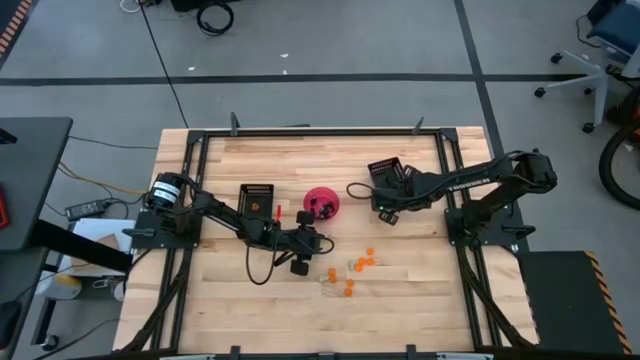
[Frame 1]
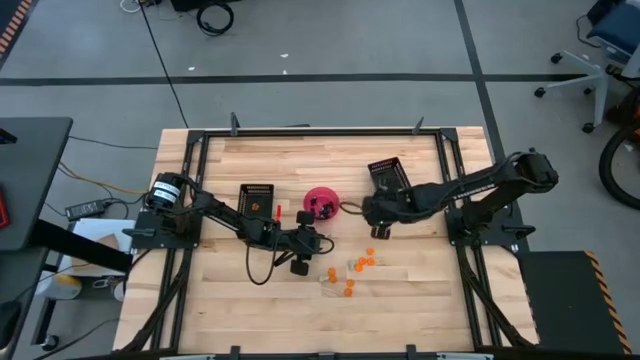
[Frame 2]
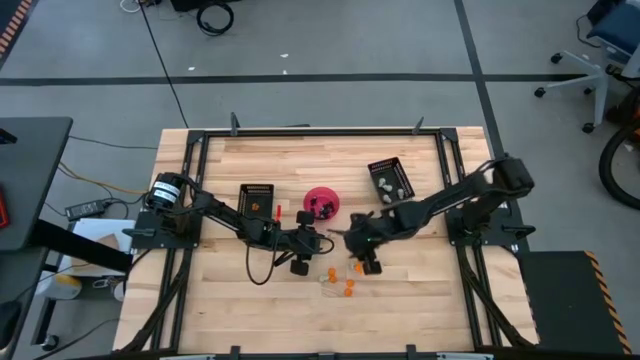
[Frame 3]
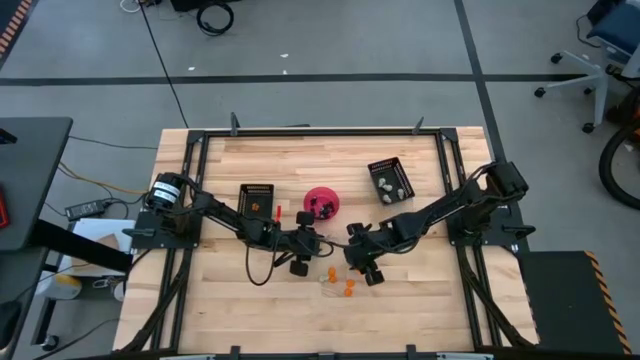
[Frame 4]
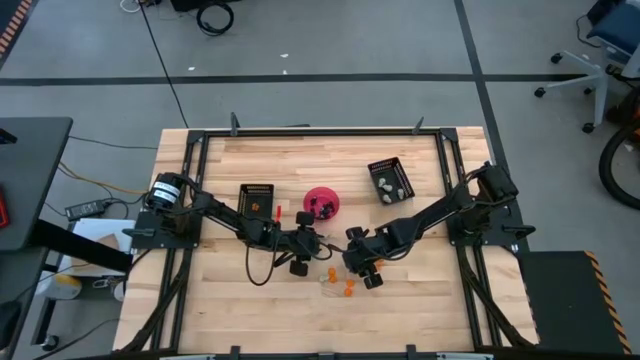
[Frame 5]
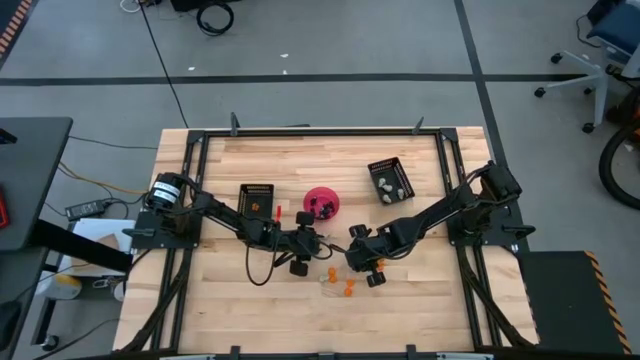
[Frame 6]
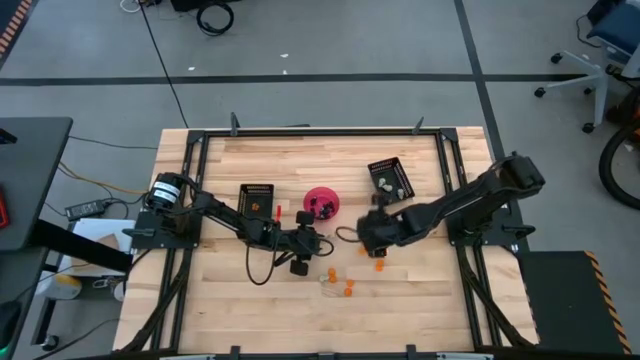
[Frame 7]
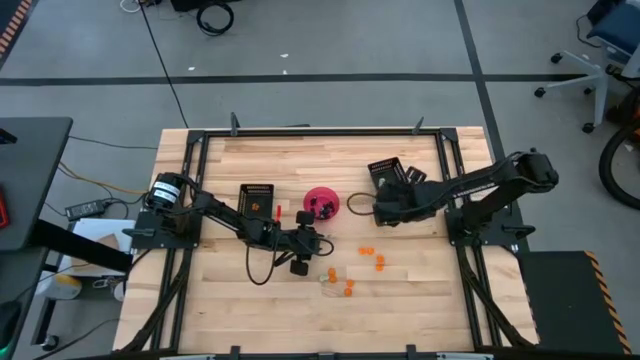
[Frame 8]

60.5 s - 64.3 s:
Task: Sort Halloween decoration
Put the white skull toy into the right black bin

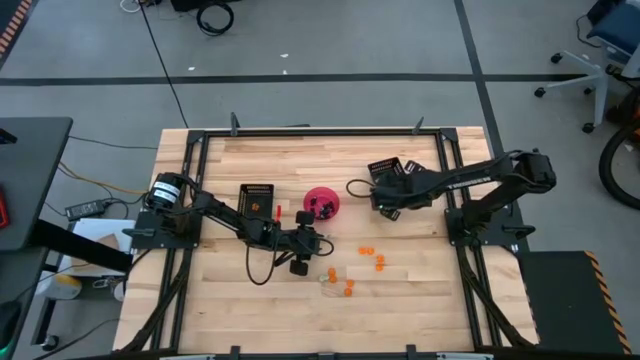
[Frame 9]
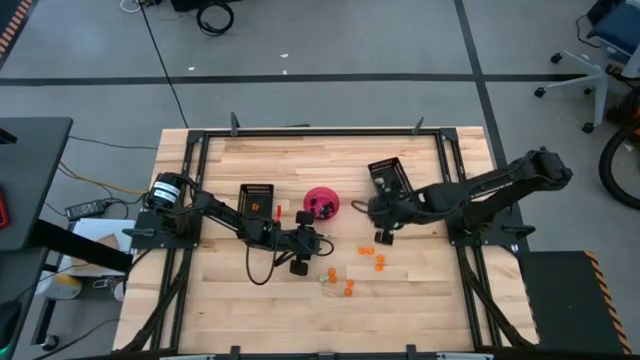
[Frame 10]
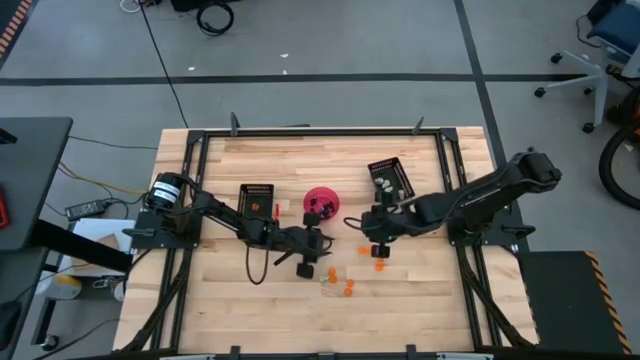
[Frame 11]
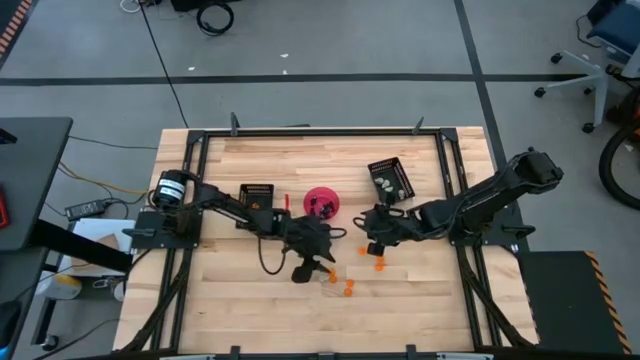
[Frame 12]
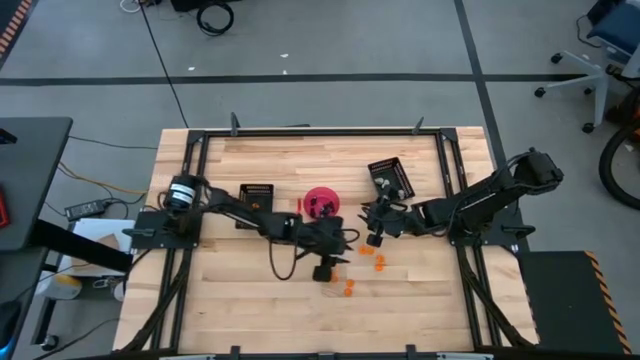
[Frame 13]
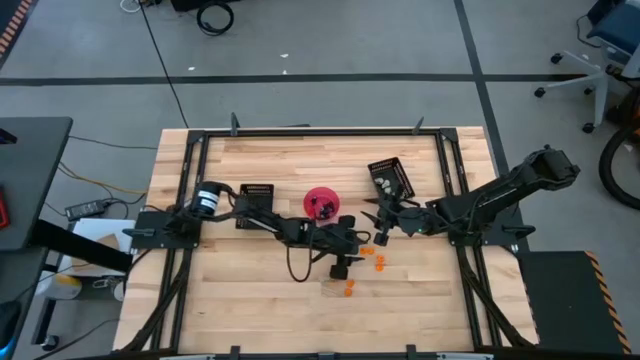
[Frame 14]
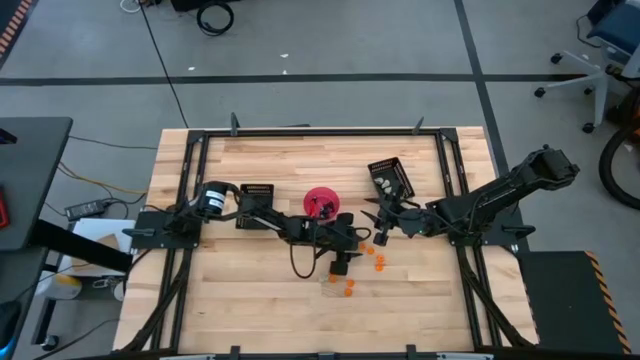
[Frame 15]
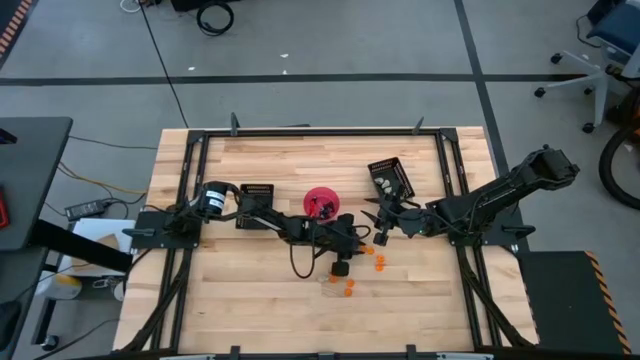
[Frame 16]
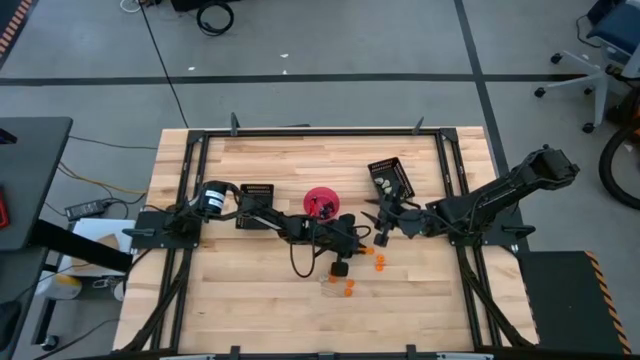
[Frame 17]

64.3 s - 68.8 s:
Put the orange pumpkin toy into the left black bin

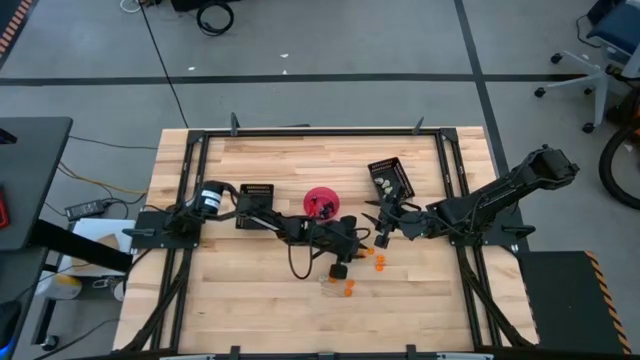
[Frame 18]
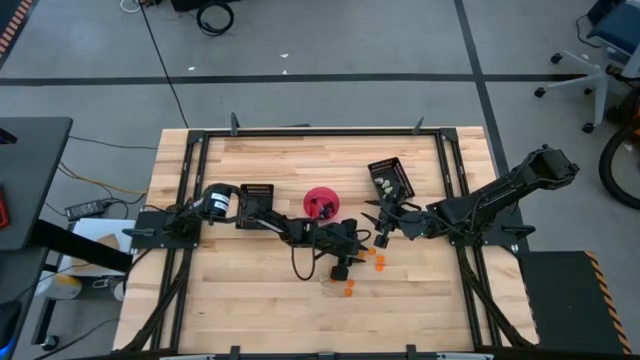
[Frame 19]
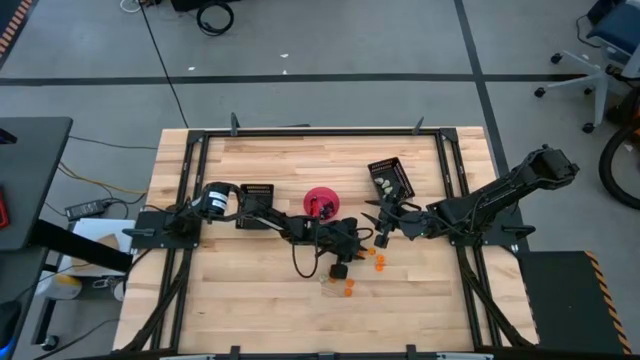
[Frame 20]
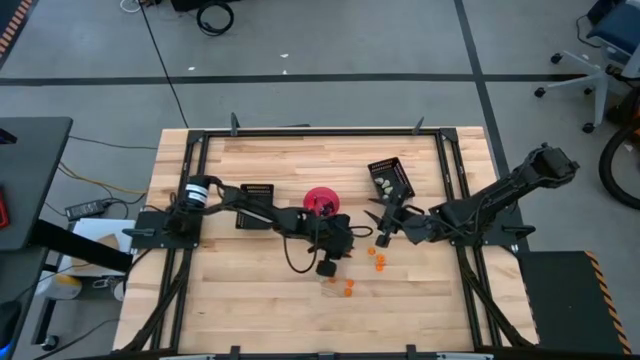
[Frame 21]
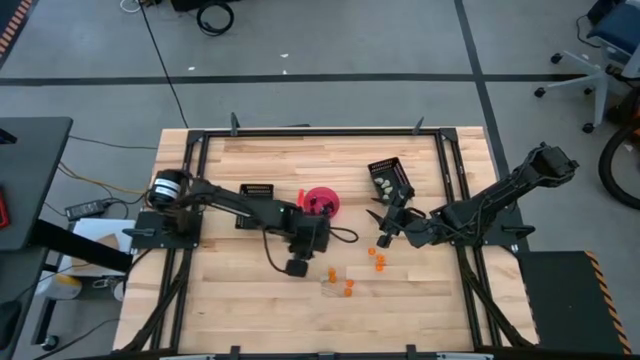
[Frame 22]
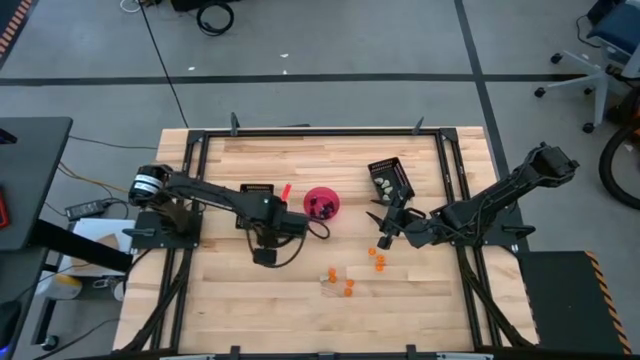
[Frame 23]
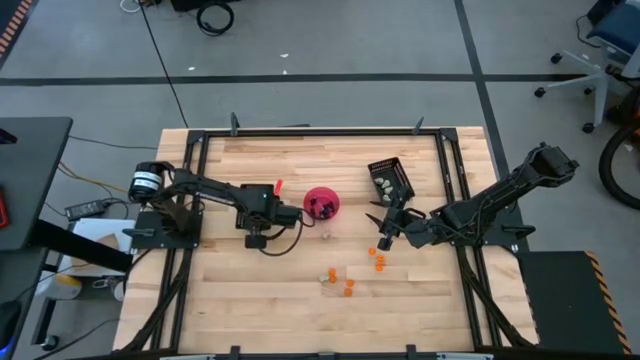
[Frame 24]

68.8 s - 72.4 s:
Put the orange pumpkin toy into the left black bin

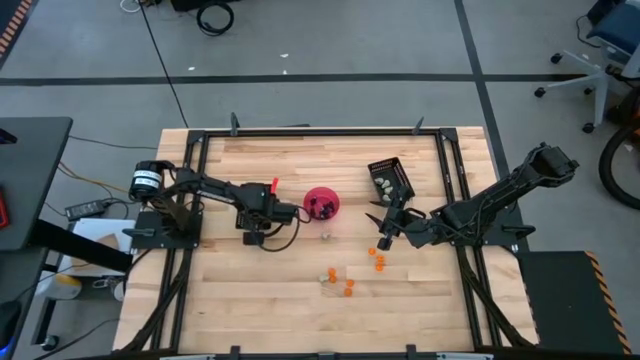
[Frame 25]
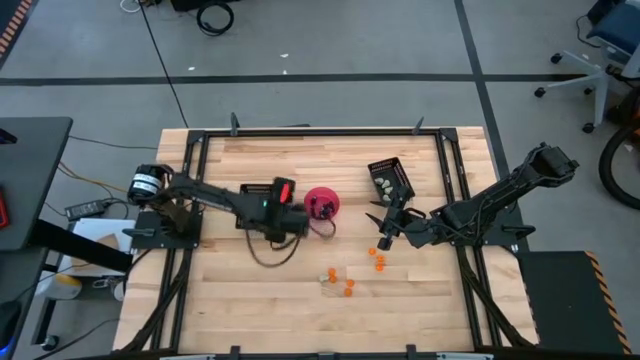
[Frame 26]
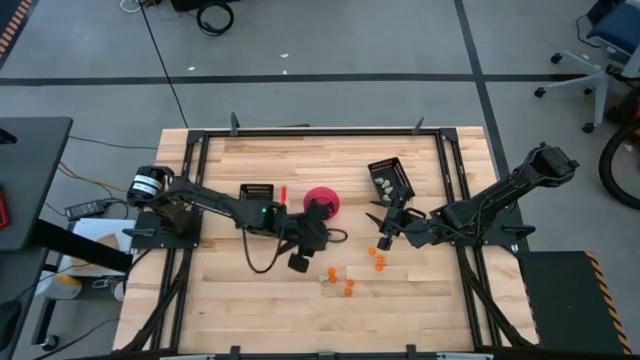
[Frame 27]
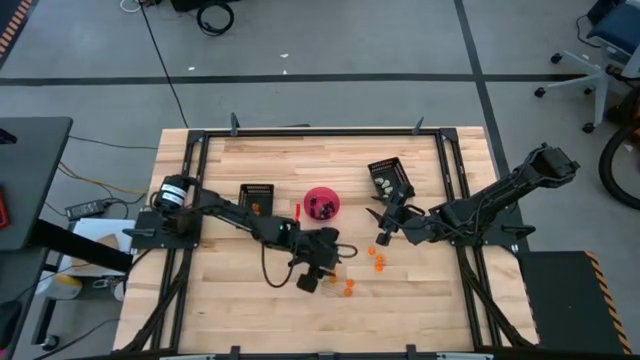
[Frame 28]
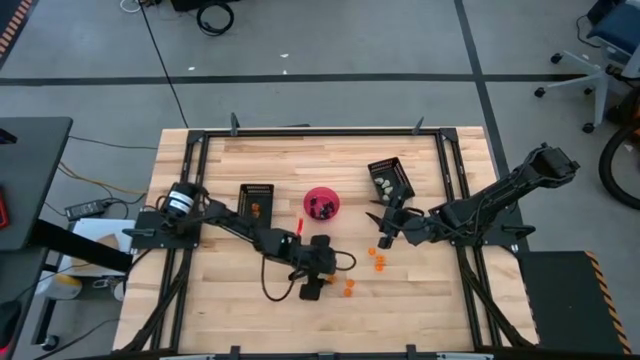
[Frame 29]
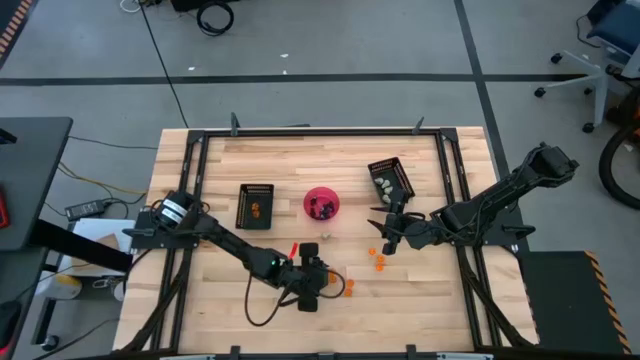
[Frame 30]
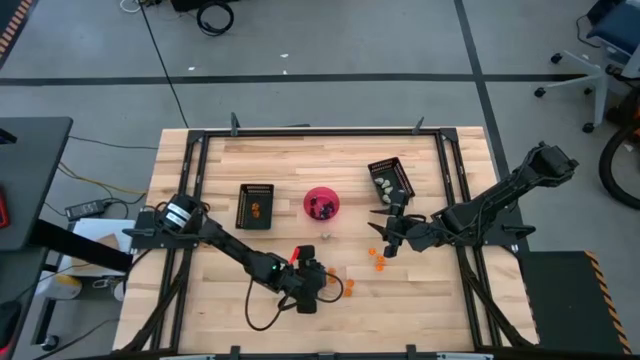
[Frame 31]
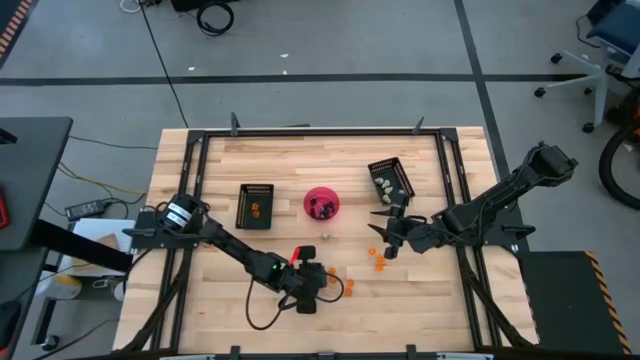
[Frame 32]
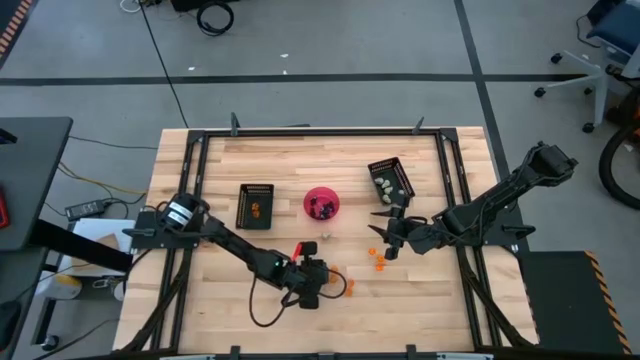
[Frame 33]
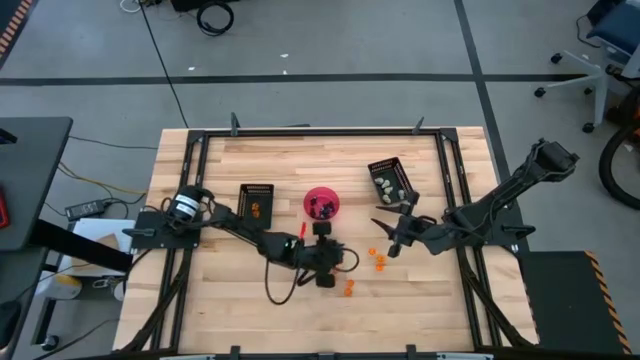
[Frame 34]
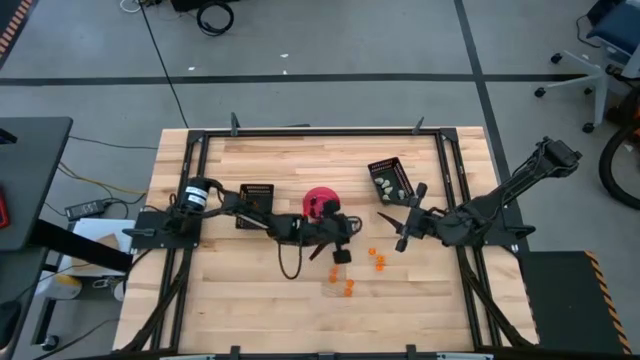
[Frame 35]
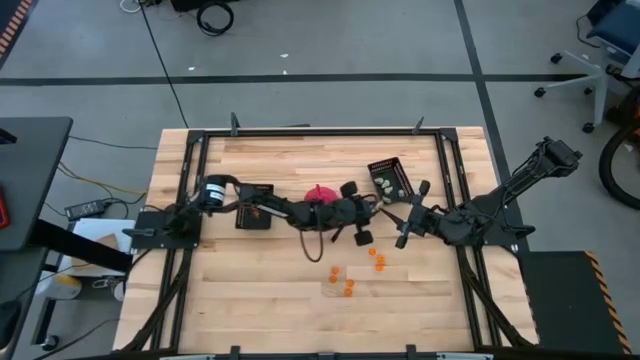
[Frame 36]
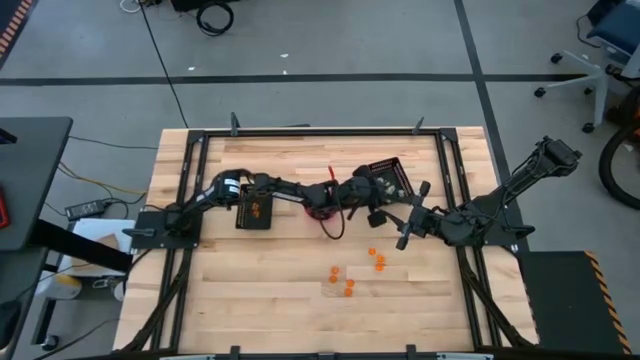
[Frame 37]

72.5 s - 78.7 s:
Put the bottom white skull toy into the right black bin

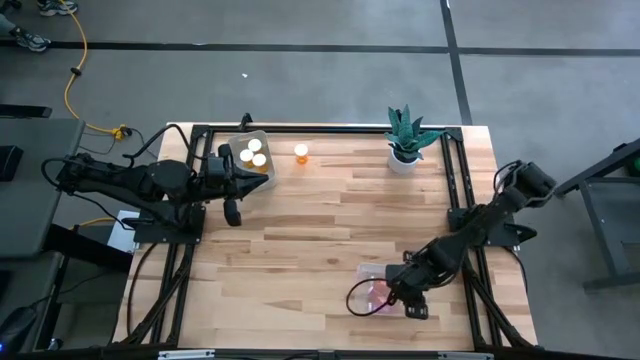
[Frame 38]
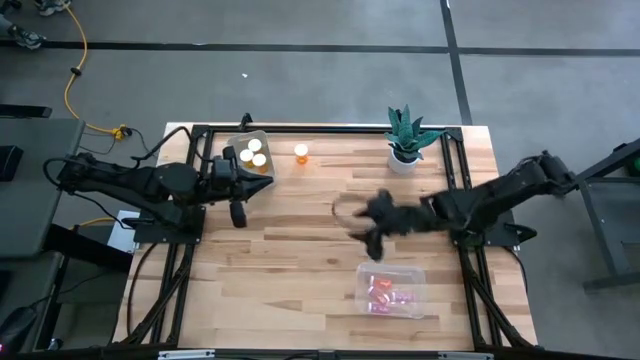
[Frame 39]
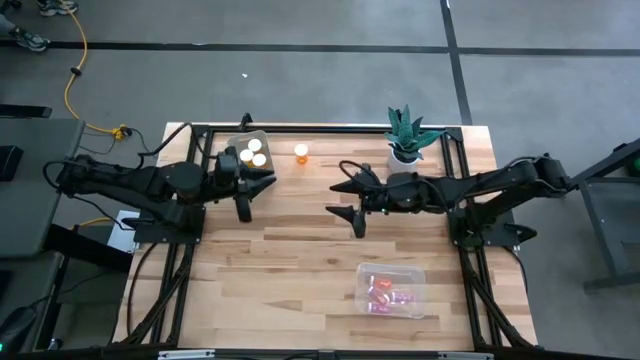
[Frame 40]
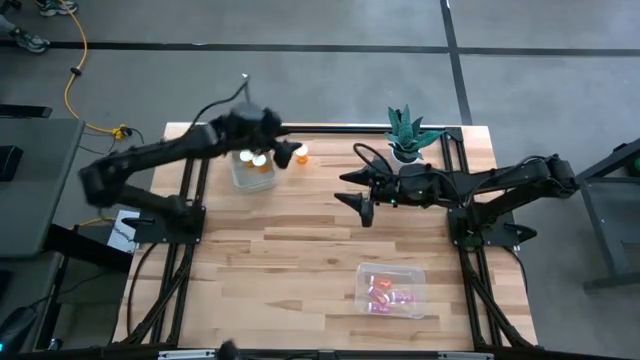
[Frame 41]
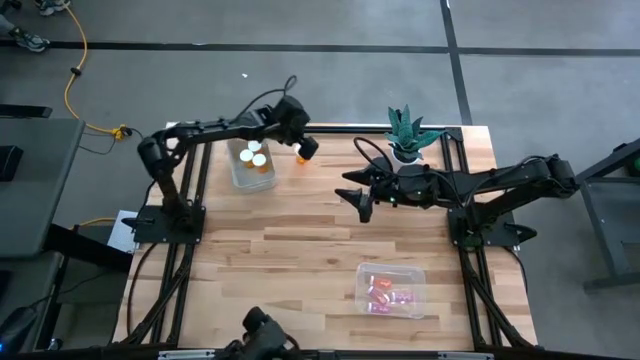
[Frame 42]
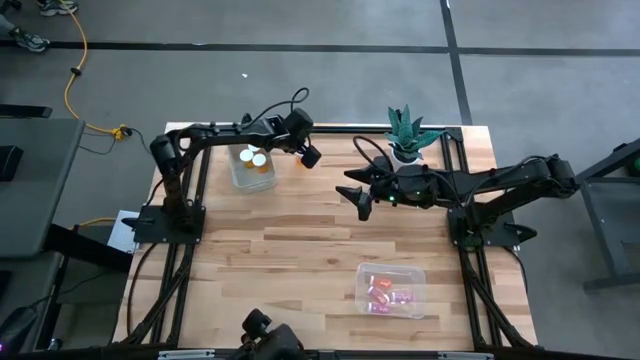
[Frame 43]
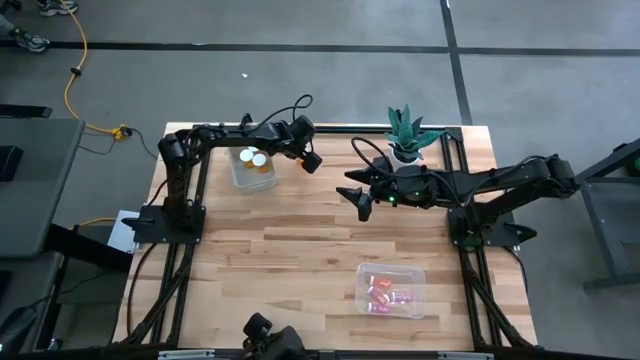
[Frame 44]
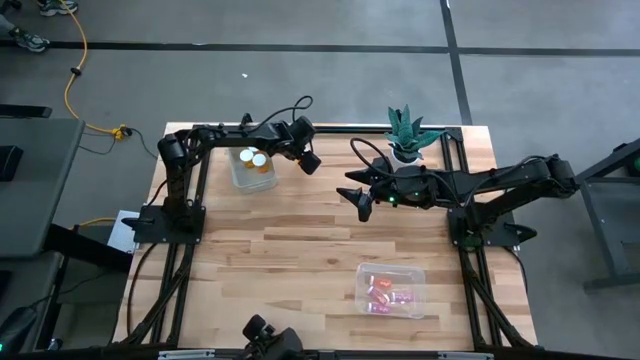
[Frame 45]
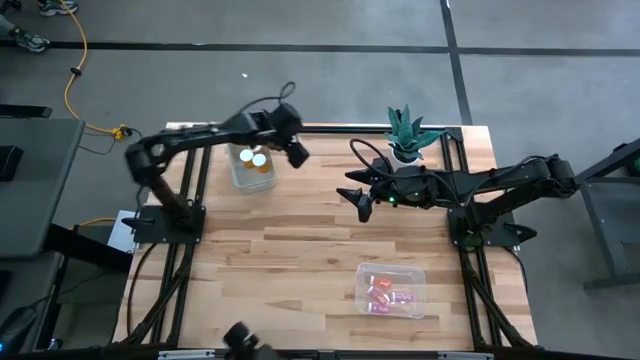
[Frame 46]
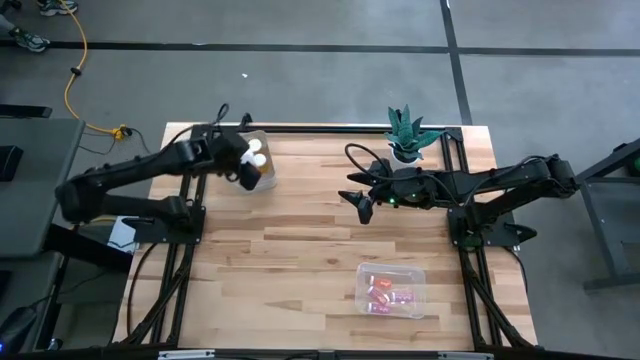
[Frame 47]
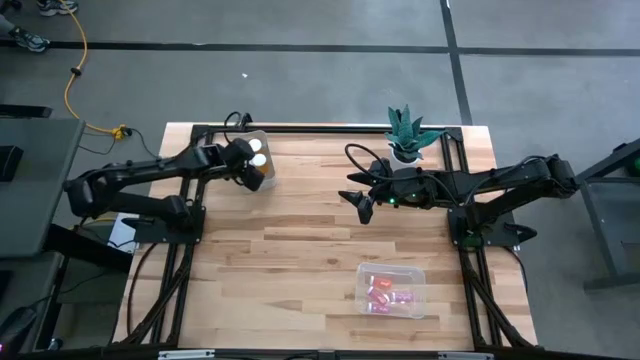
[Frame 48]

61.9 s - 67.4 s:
Task: Pick and place medicine bottles into bin by pill shape (circle, oval)
Put the large orange pill bottle into the gray bin
